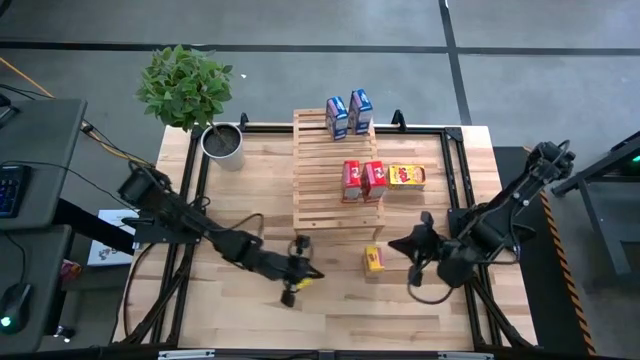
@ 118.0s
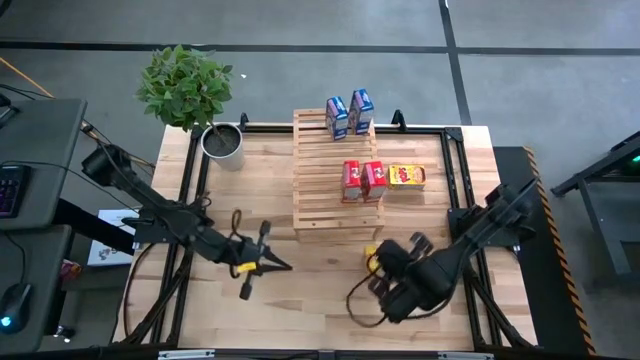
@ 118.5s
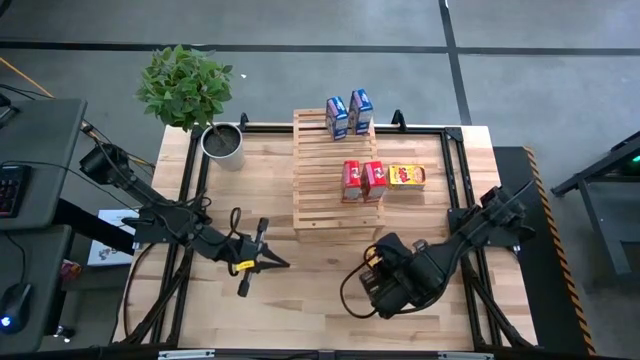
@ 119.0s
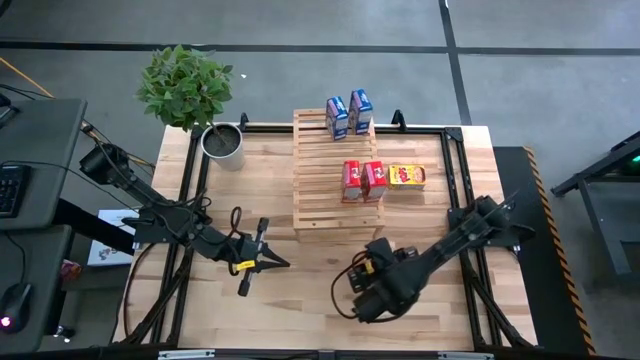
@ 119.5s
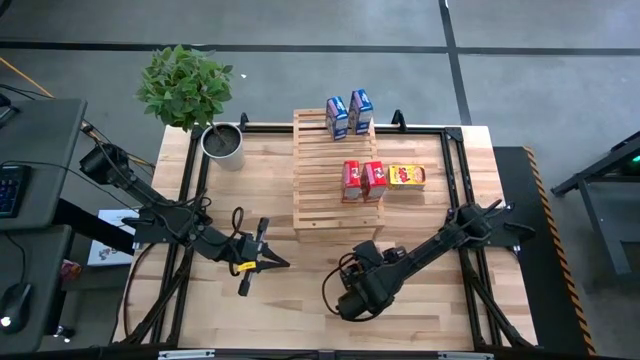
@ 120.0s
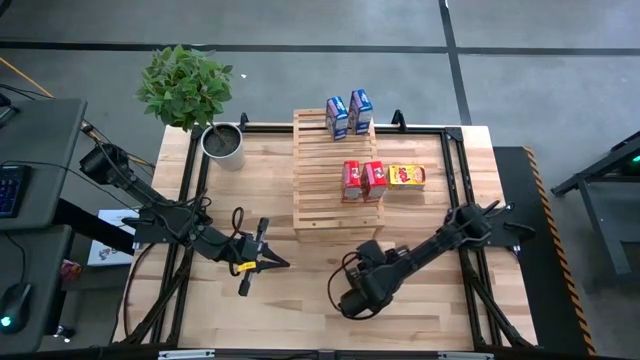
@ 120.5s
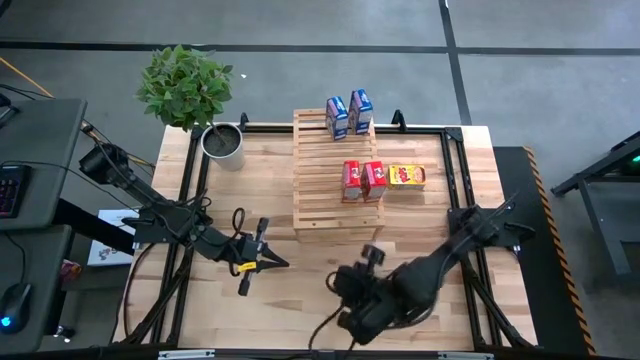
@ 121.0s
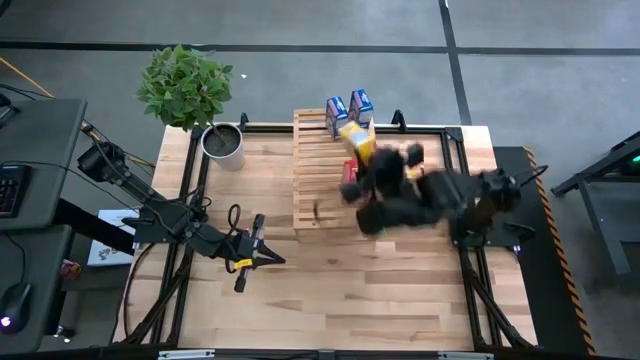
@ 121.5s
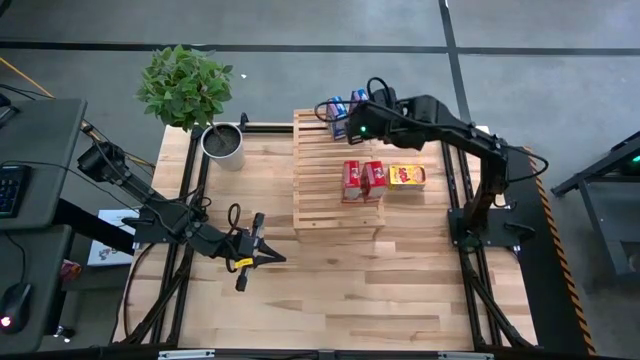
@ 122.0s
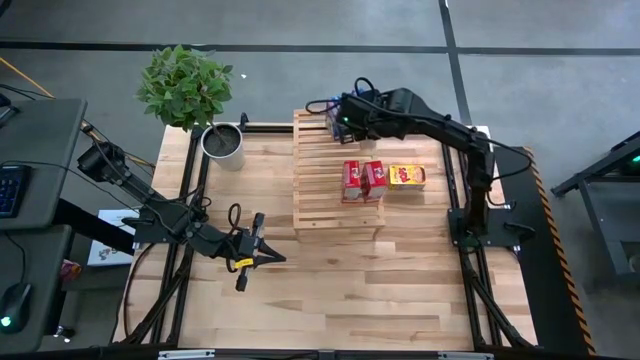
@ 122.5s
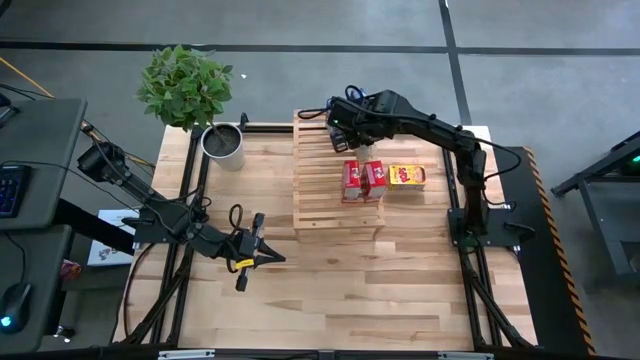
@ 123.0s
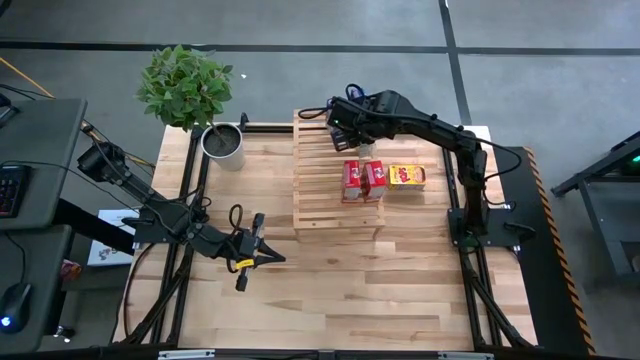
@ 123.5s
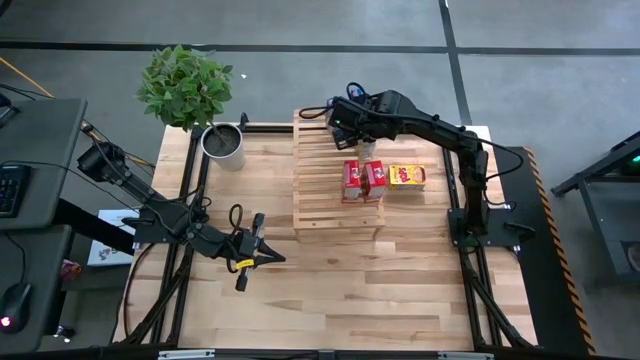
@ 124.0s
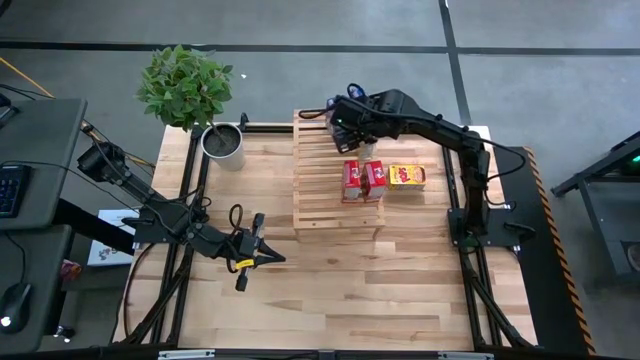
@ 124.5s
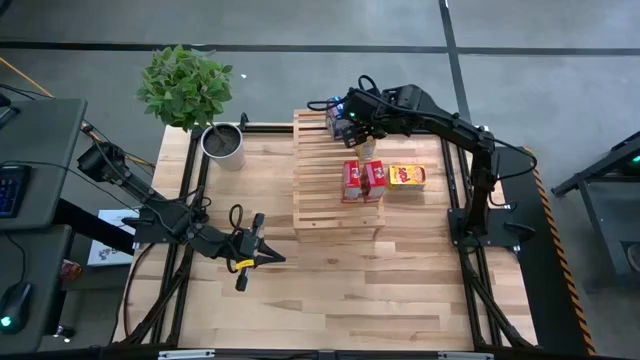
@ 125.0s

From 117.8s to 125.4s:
Task: Stack cereal on shelf
Put the yellow cereal box on the shelf

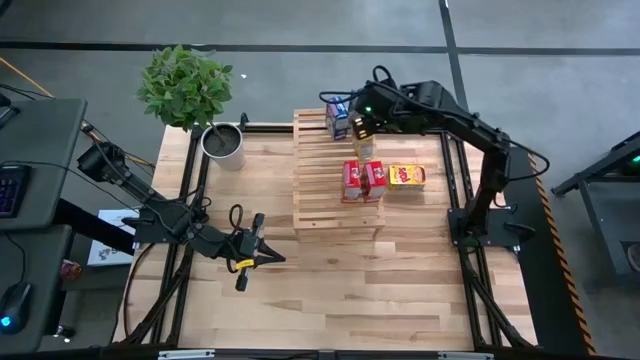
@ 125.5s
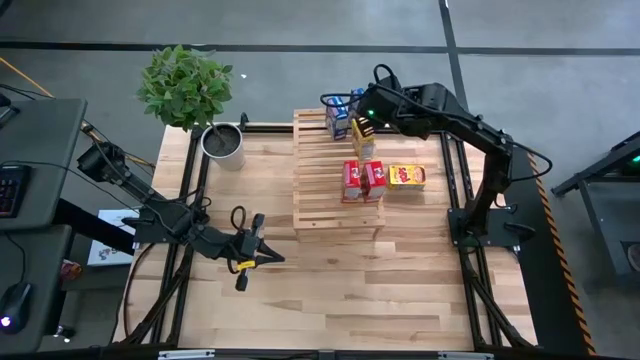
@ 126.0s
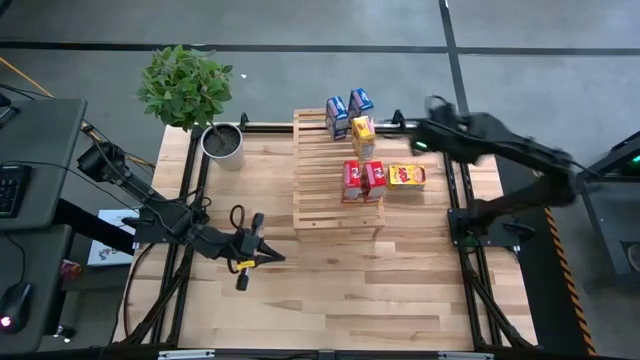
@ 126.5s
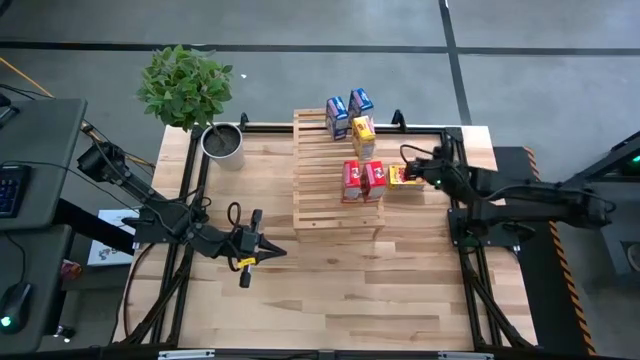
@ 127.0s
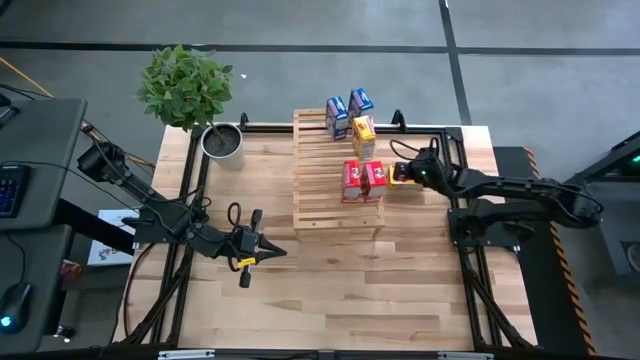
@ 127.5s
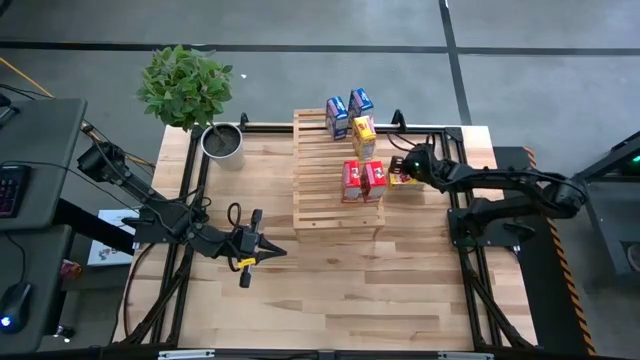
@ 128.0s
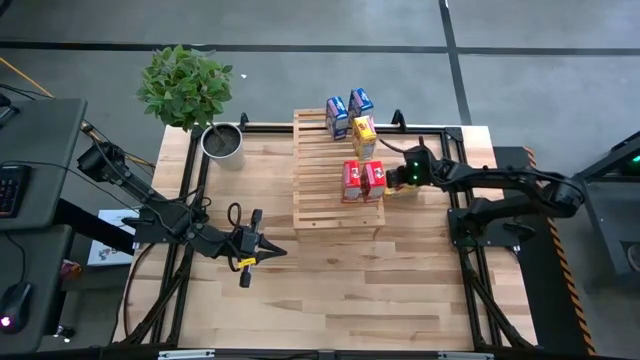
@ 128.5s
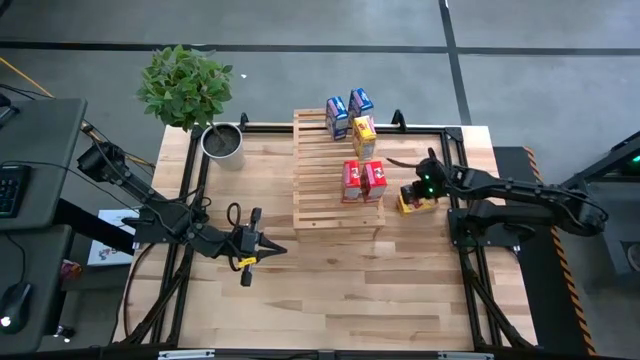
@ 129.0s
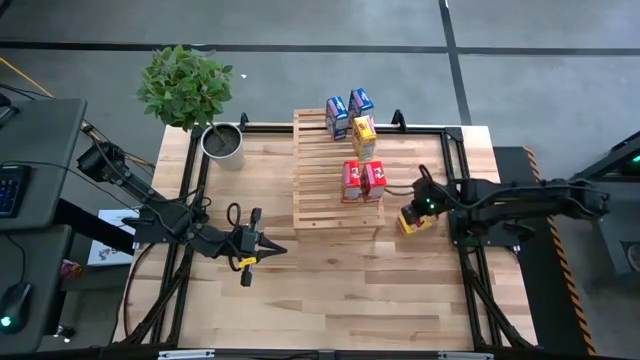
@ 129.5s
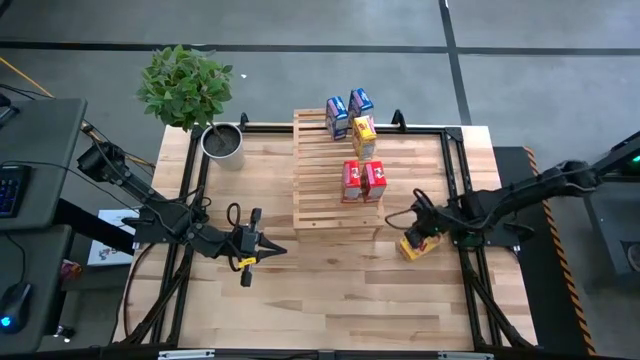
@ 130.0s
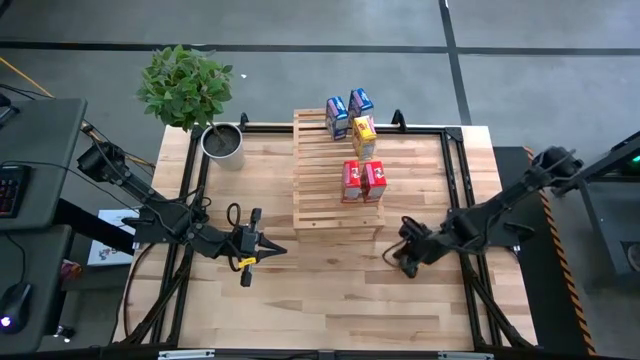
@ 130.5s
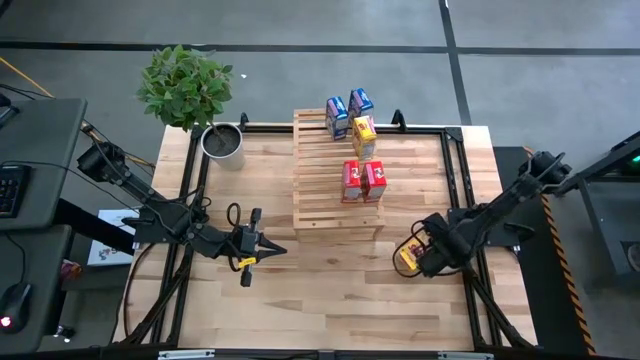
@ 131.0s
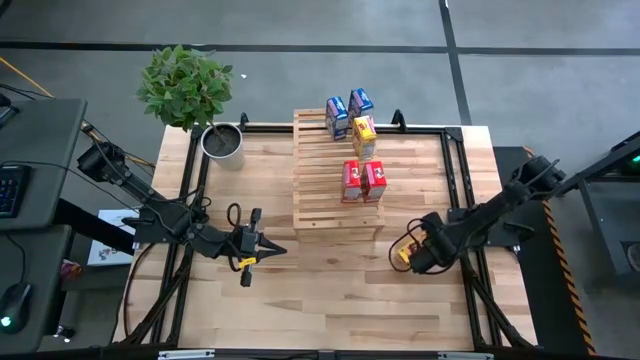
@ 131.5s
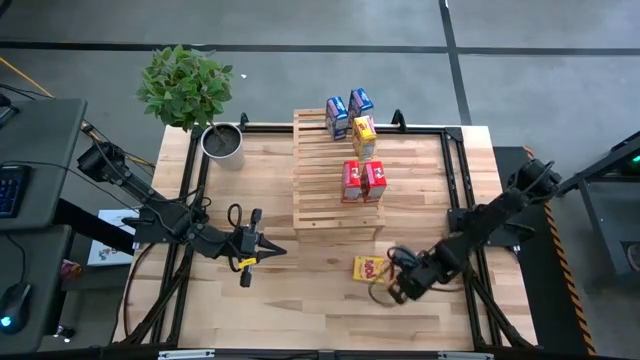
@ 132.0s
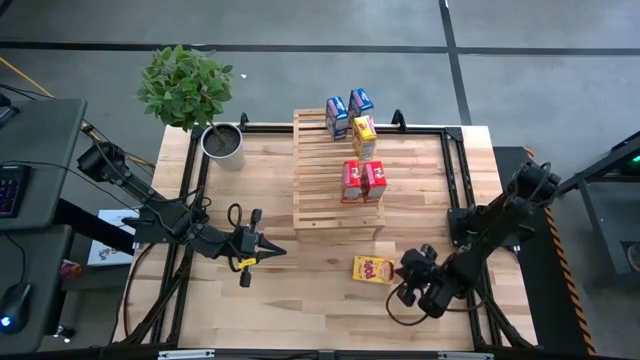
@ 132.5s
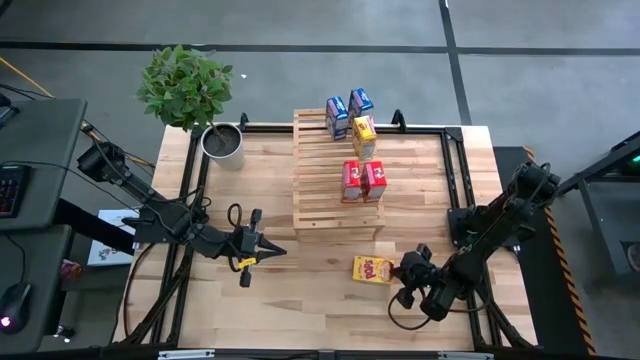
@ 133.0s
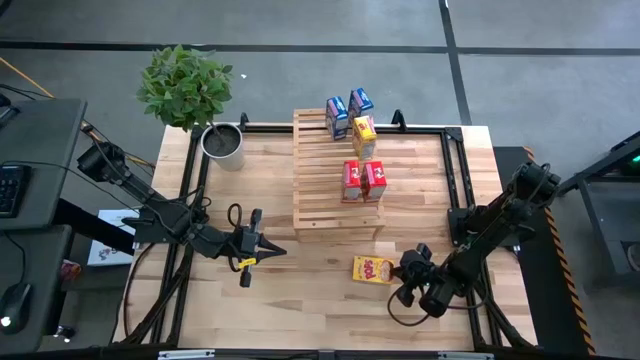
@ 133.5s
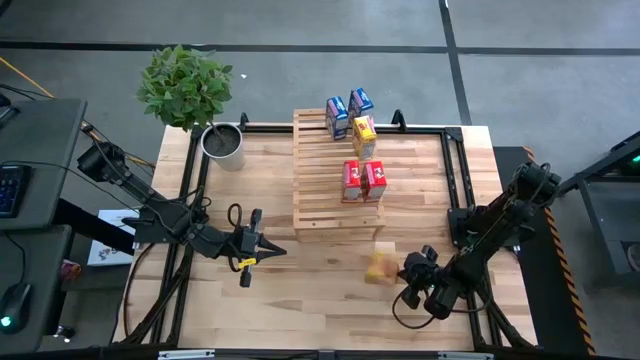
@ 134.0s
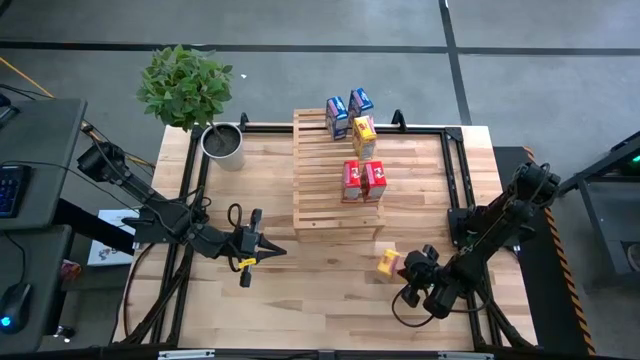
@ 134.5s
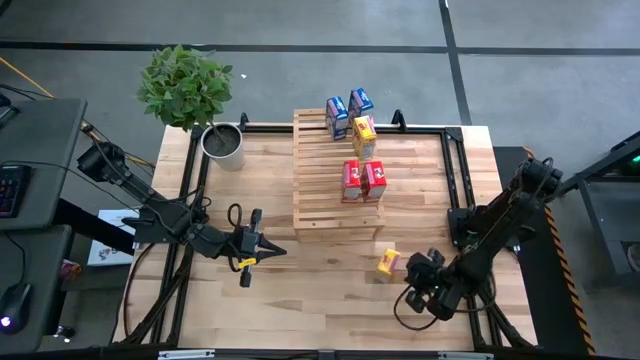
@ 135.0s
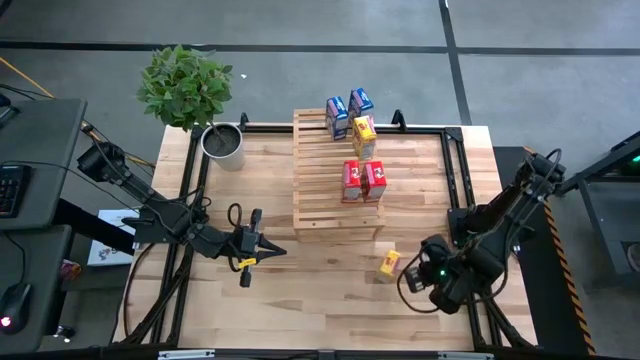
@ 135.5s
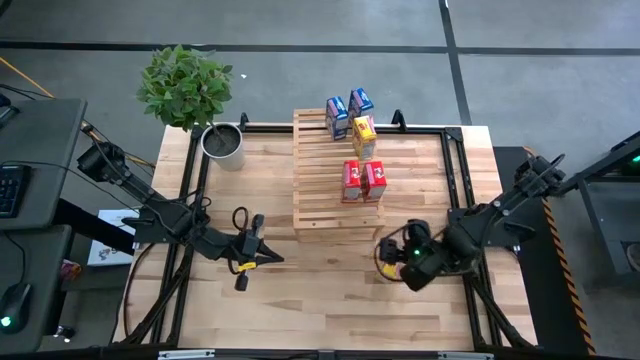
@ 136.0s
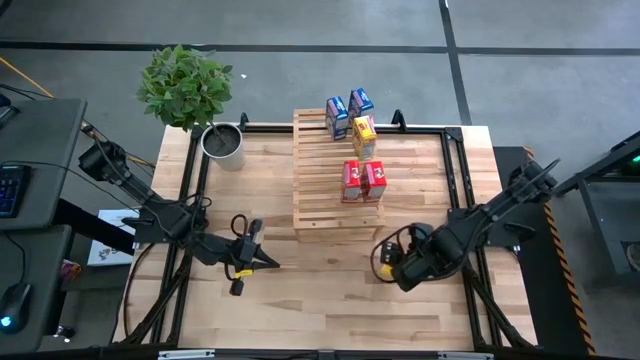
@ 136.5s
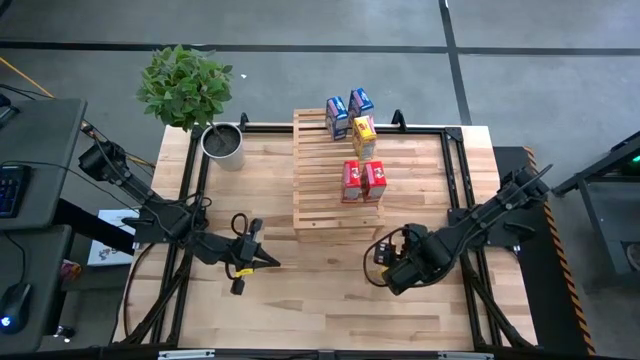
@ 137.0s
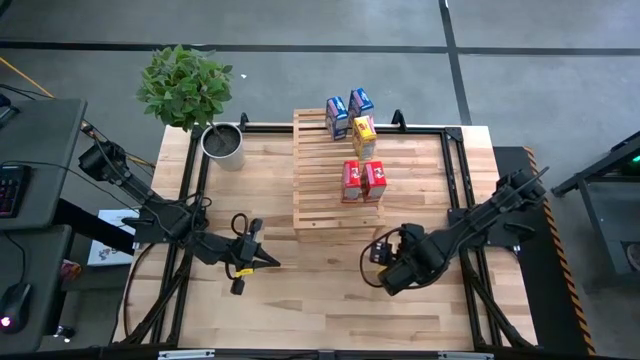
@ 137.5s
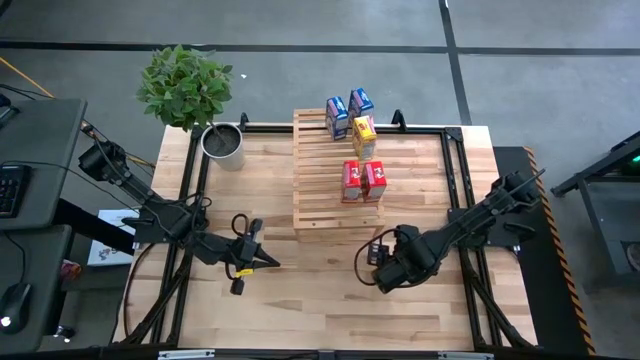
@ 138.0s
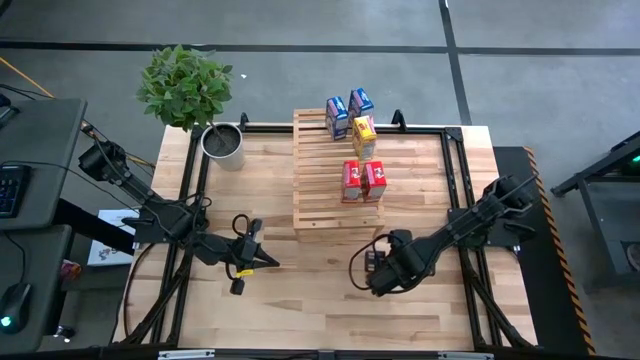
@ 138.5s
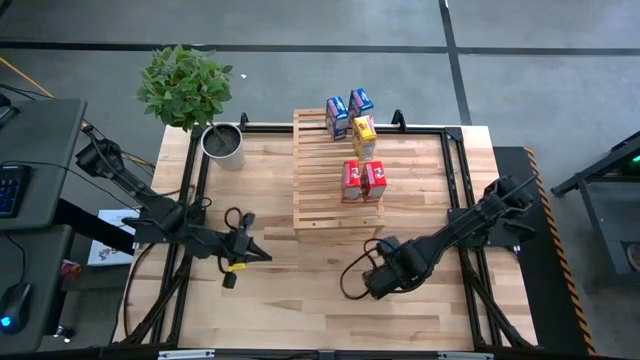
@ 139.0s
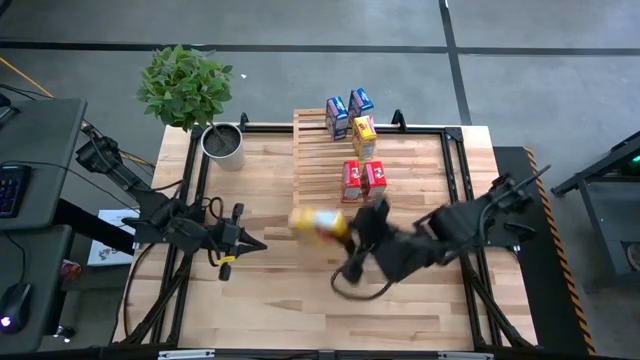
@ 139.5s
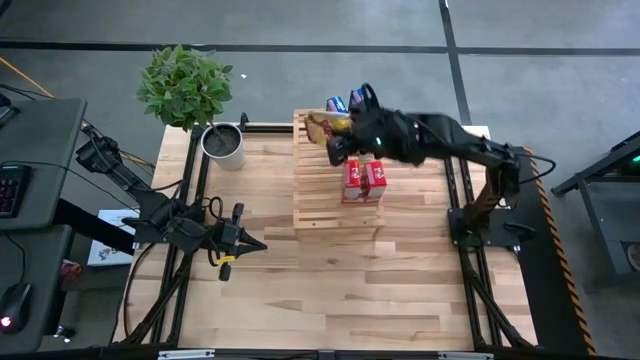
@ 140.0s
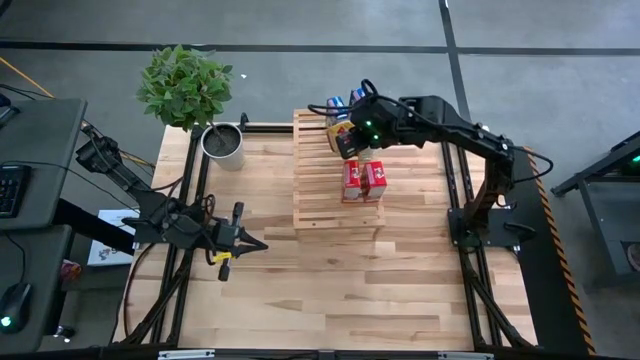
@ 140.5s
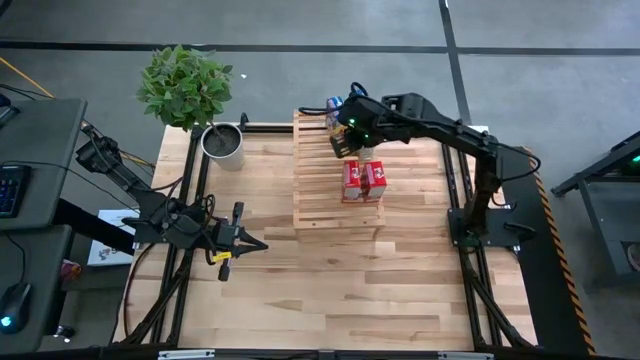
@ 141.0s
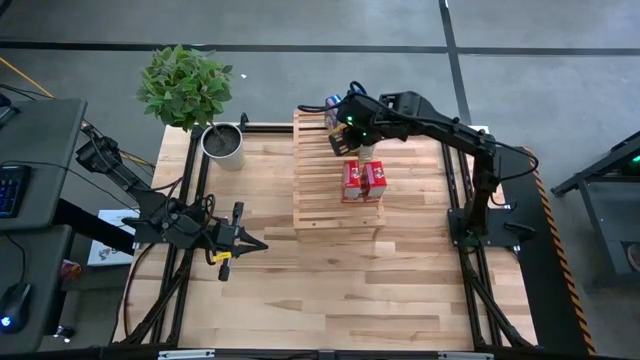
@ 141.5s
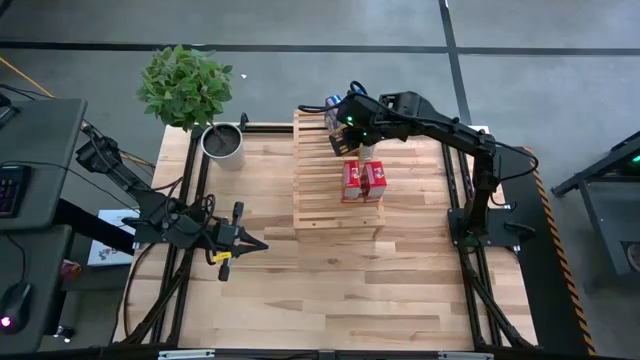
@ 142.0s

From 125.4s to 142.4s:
Put the yellow cereal box on the shelf aligned with the other yellow cereal box
